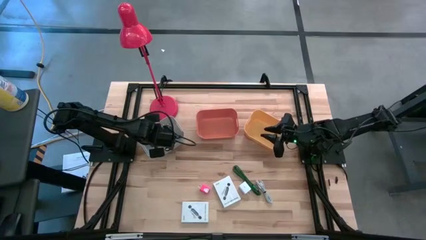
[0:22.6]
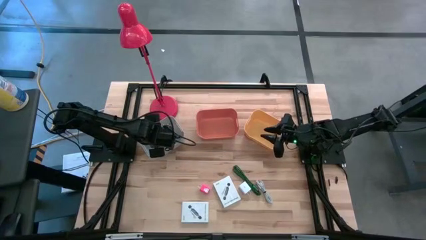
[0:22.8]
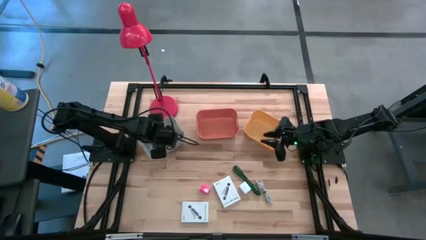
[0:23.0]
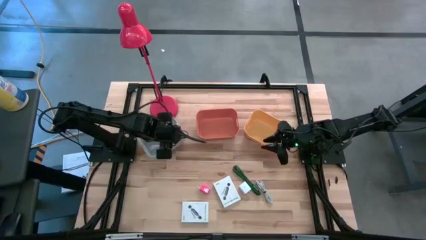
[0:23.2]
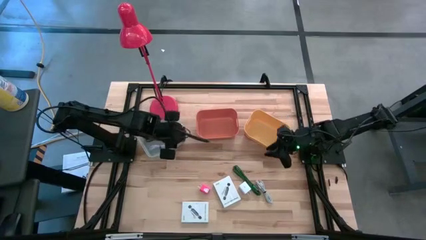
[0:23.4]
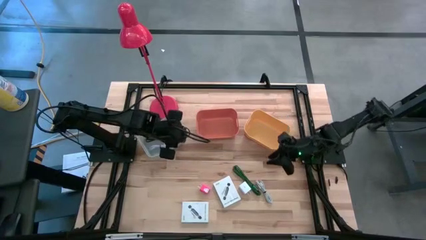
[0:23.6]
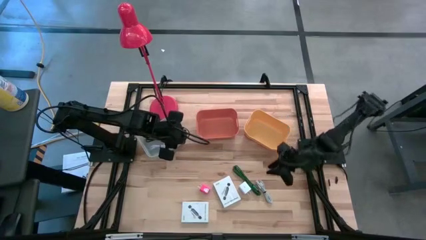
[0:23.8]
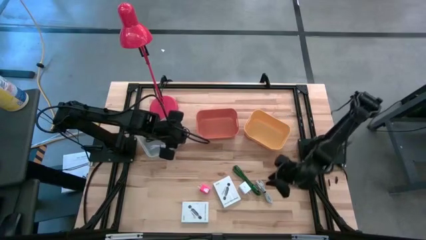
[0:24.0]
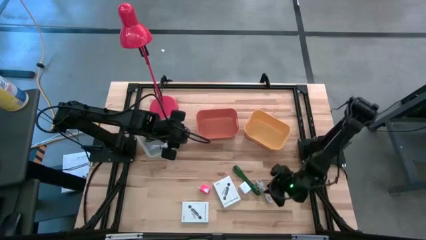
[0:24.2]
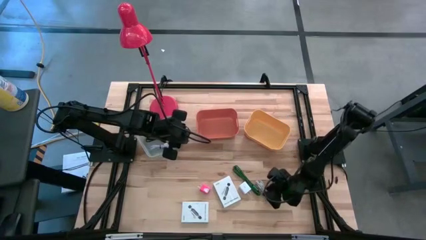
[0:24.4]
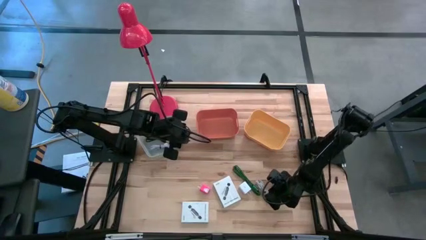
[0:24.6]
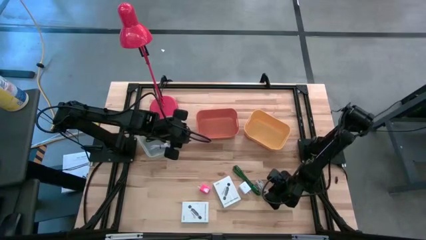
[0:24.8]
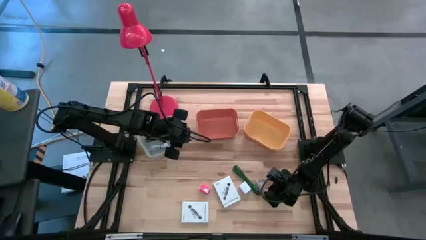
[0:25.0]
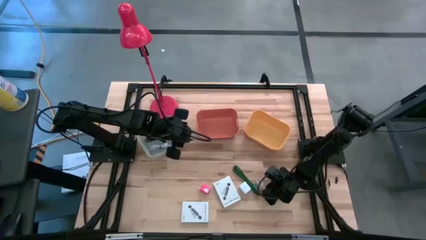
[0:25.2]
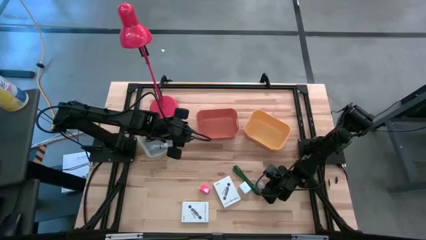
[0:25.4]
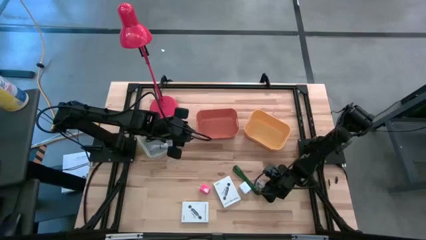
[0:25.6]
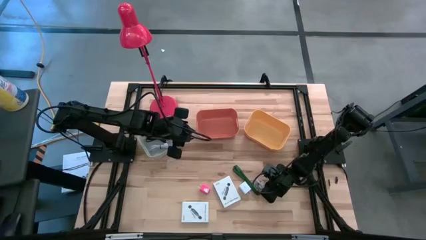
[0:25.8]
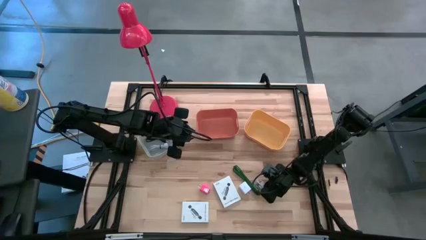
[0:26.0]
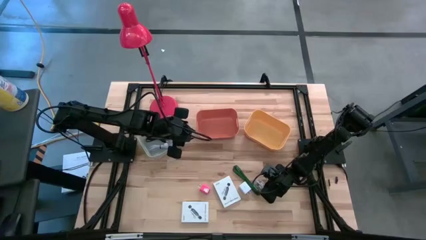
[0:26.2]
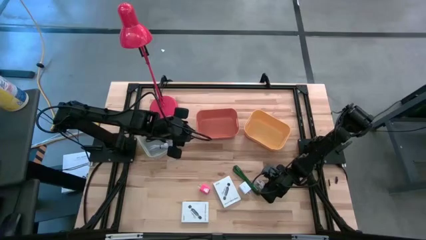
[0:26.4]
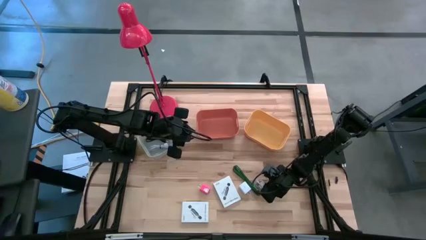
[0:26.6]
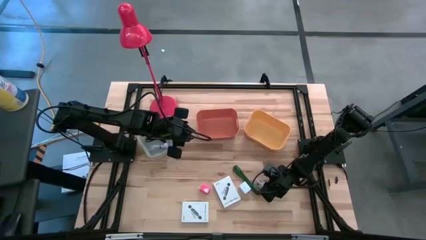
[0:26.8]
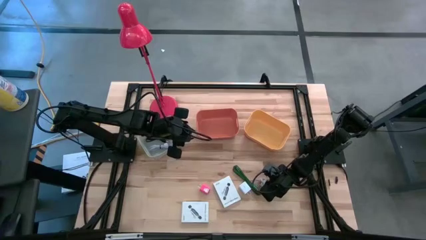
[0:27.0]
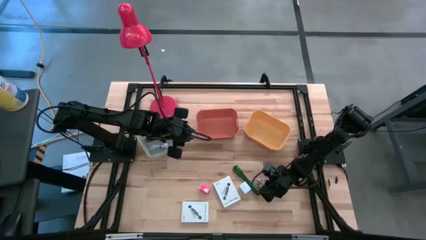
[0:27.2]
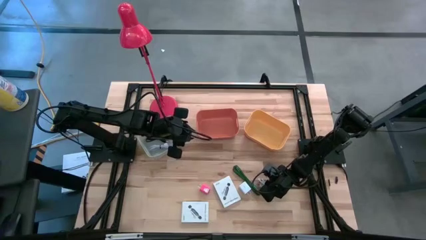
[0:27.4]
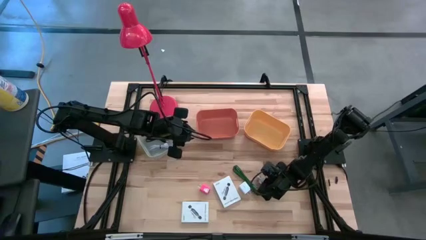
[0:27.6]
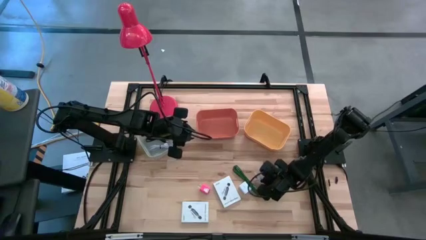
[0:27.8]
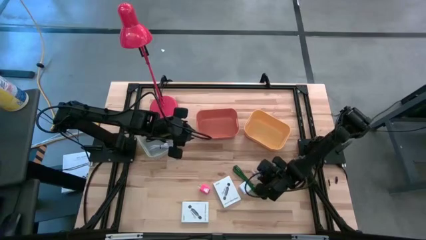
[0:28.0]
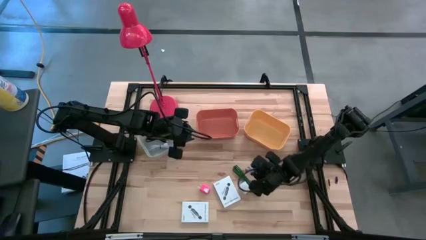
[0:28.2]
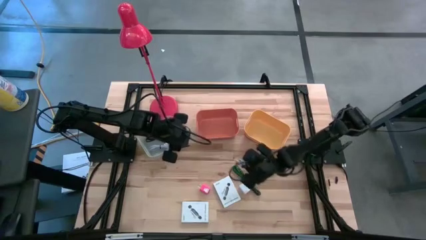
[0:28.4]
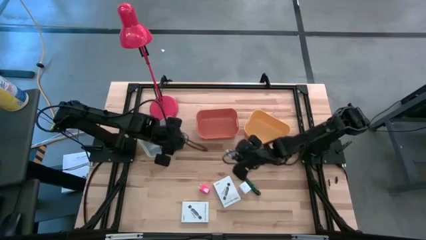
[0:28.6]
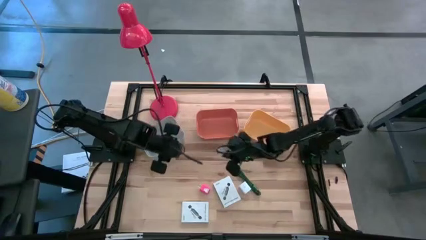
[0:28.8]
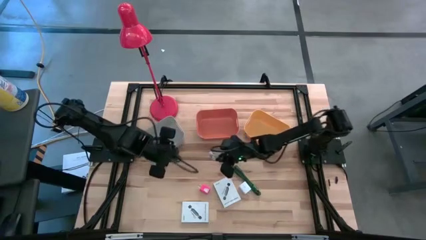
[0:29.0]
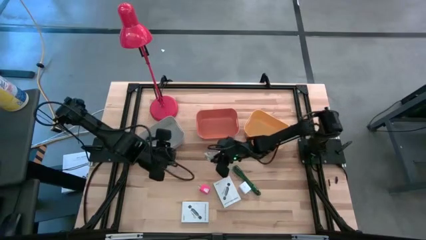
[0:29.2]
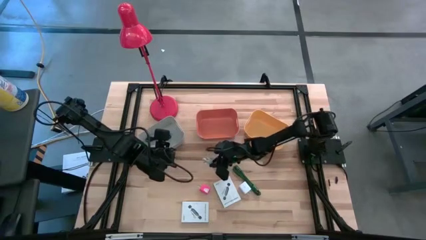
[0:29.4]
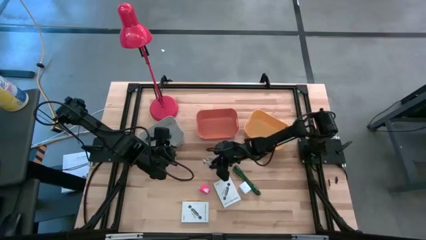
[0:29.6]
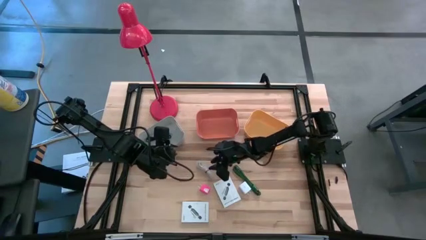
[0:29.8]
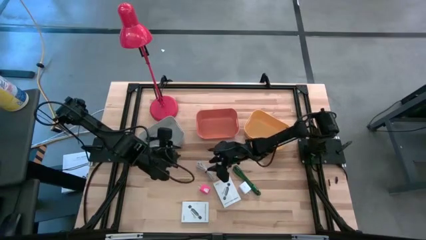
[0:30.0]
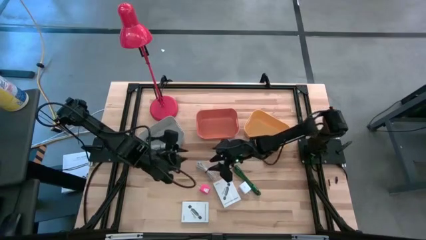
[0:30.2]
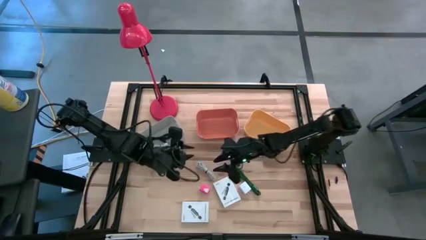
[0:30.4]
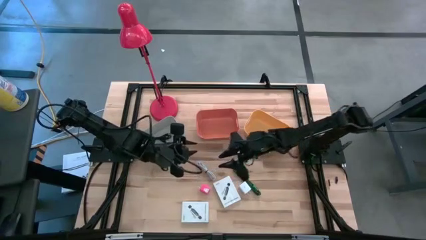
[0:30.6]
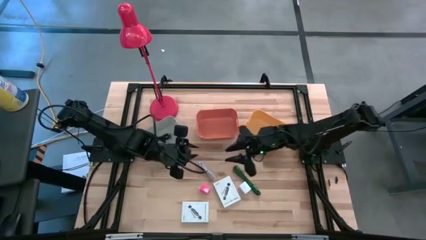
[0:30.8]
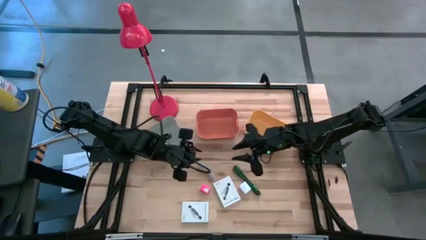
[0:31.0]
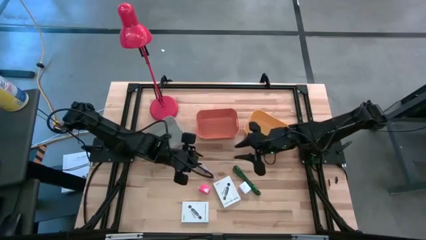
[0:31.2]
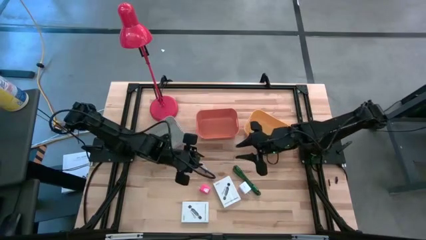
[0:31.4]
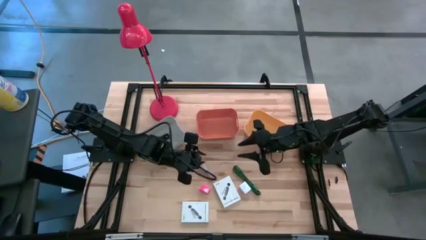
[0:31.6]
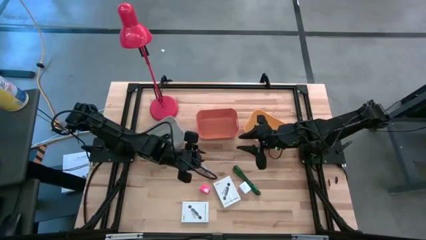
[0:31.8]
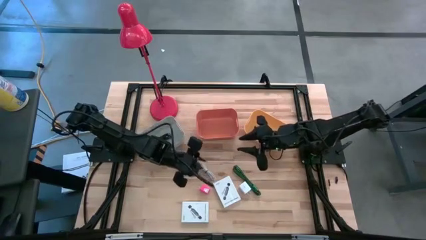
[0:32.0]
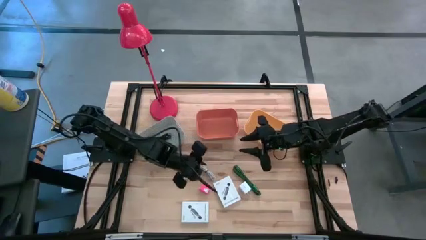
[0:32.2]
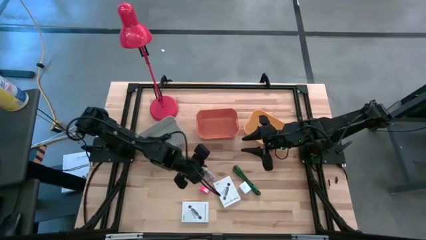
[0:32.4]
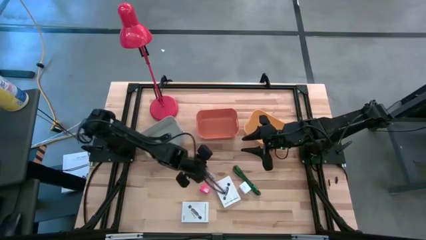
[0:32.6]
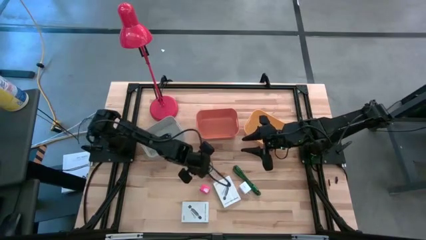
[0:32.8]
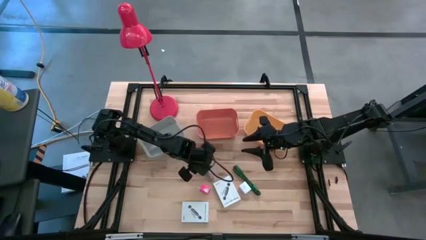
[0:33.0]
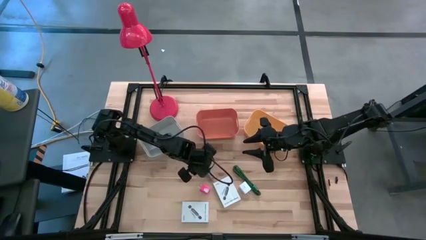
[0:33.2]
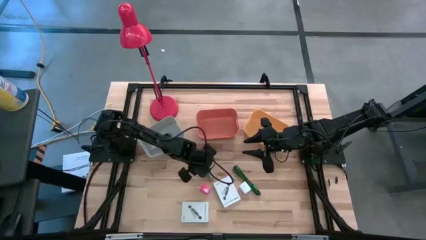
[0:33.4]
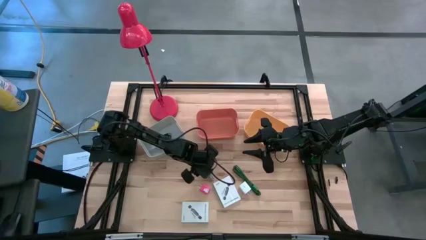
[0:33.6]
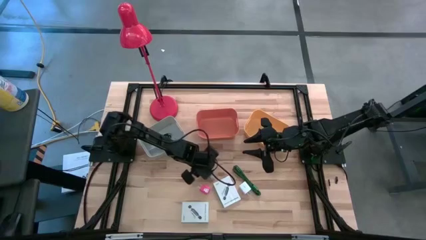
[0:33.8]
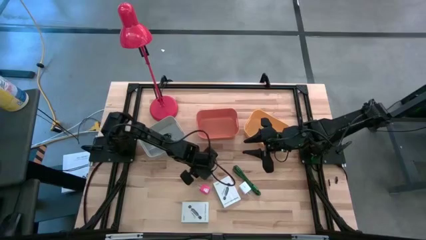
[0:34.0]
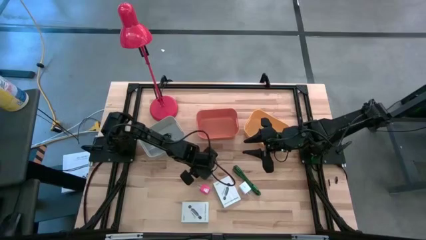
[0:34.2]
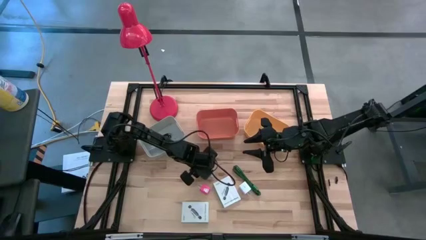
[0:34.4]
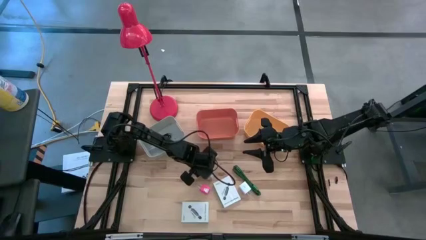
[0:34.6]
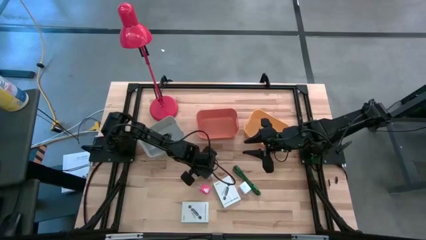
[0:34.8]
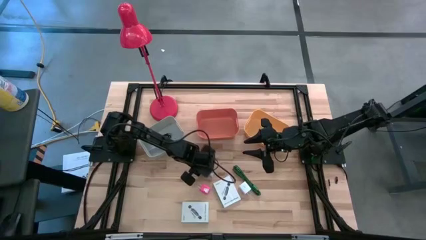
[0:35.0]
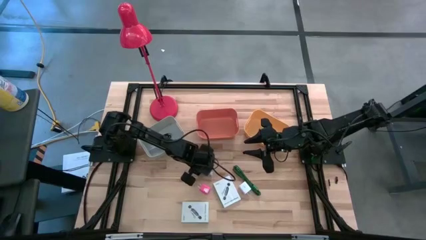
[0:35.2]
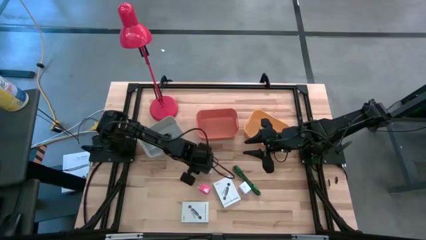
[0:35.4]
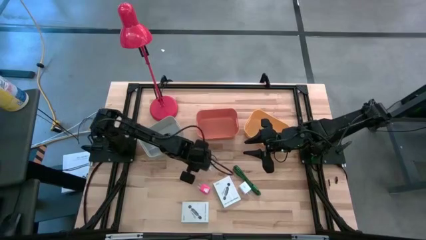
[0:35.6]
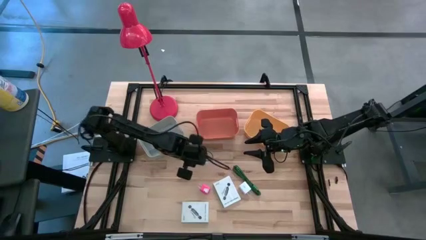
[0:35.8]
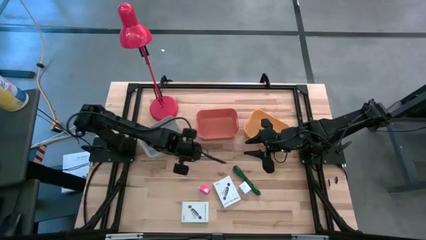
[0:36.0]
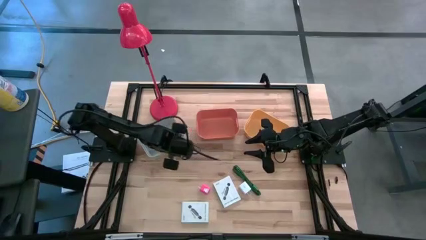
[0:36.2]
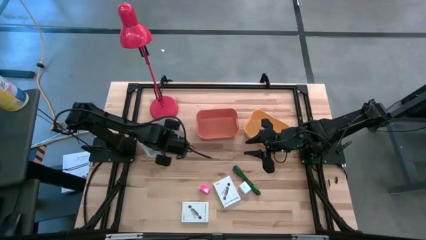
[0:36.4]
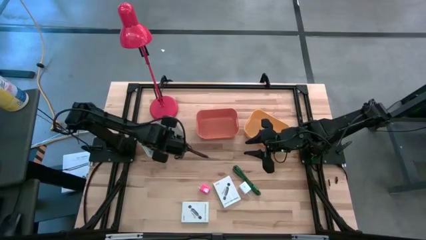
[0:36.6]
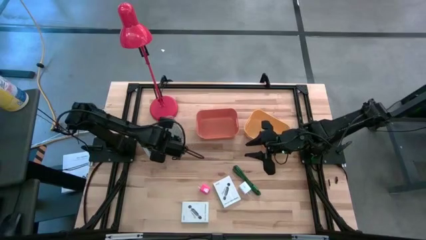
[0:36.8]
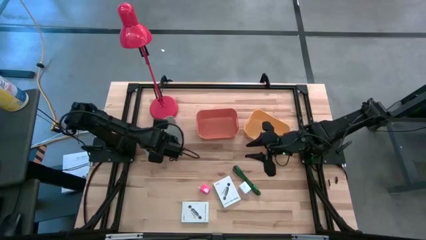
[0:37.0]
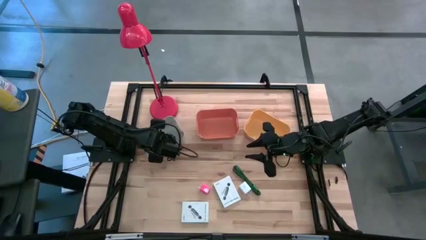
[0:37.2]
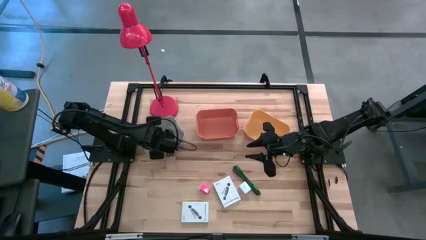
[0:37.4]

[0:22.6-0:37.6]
Task: Pick and place items into bin
Put the white charger cable into the gray bin
